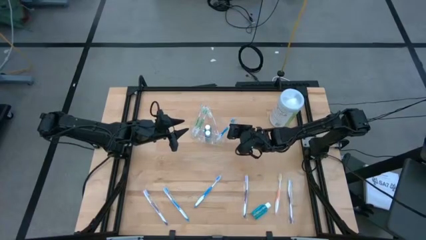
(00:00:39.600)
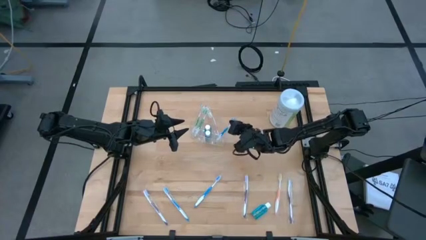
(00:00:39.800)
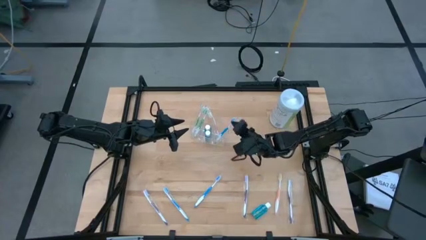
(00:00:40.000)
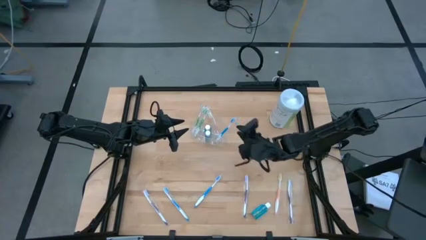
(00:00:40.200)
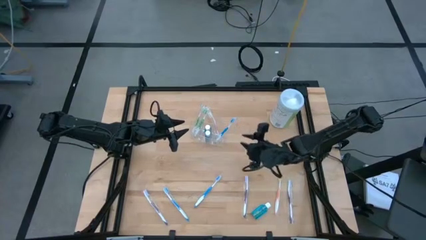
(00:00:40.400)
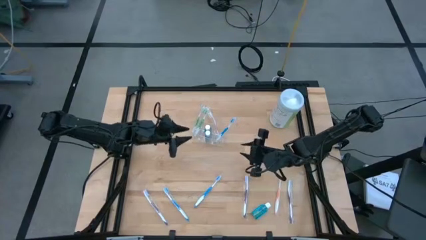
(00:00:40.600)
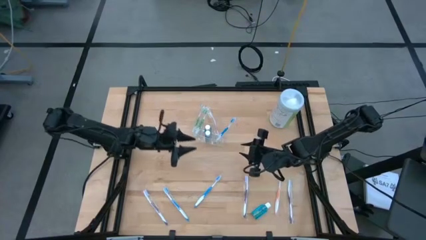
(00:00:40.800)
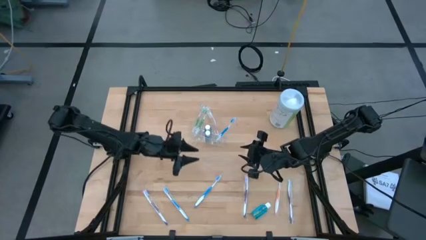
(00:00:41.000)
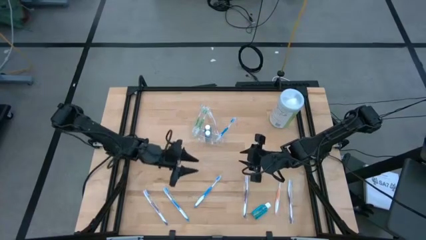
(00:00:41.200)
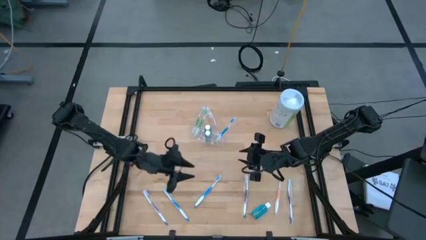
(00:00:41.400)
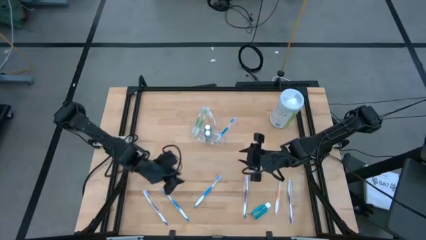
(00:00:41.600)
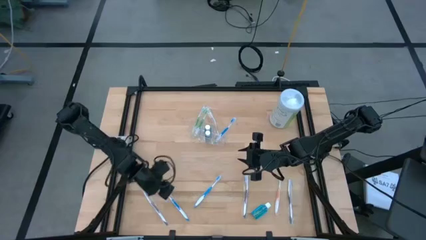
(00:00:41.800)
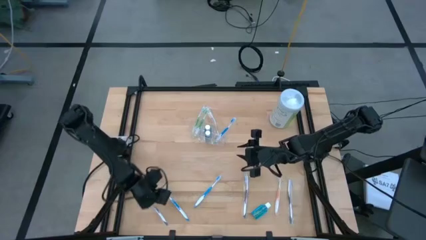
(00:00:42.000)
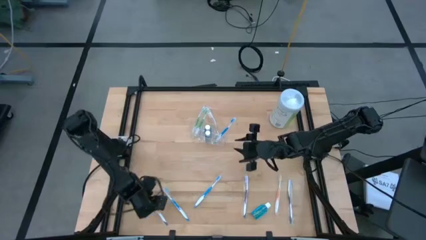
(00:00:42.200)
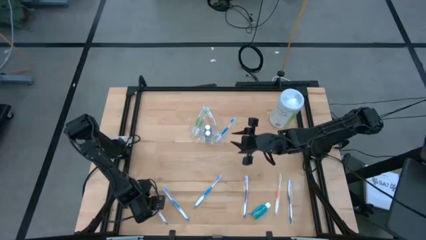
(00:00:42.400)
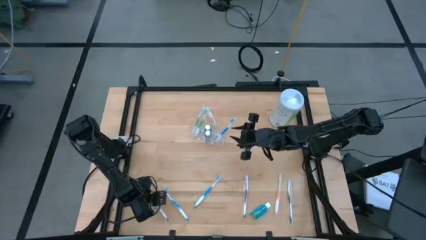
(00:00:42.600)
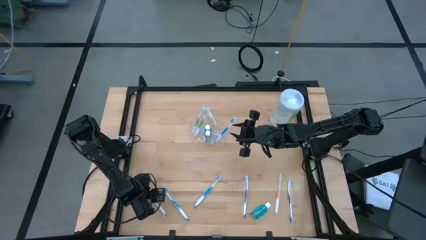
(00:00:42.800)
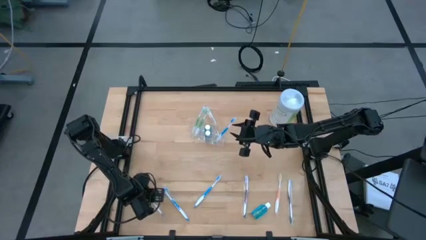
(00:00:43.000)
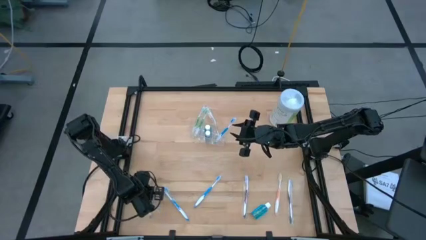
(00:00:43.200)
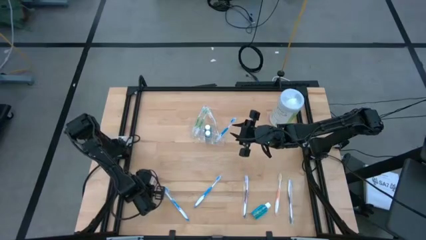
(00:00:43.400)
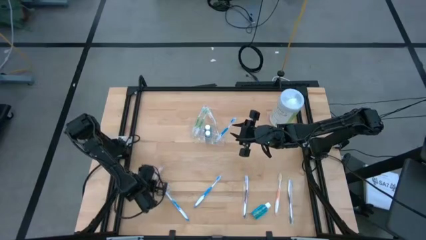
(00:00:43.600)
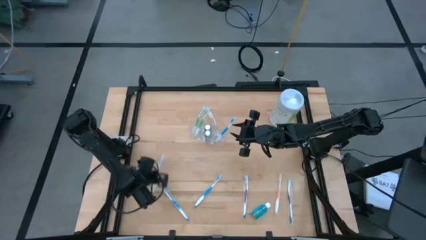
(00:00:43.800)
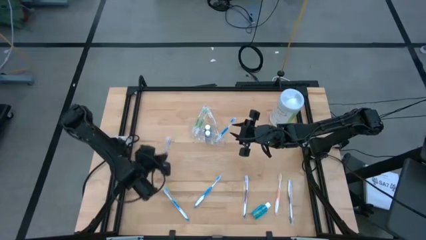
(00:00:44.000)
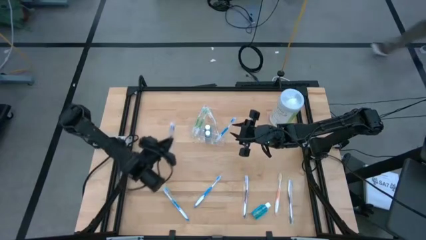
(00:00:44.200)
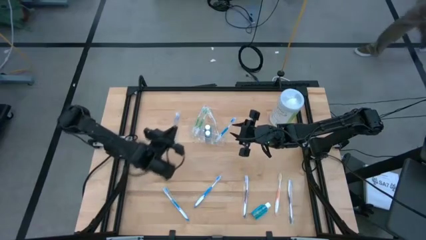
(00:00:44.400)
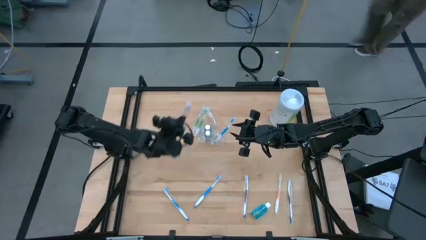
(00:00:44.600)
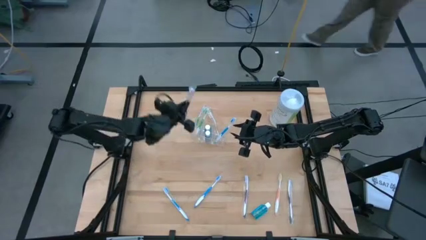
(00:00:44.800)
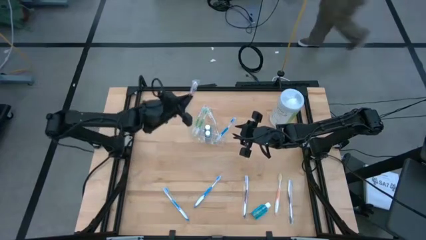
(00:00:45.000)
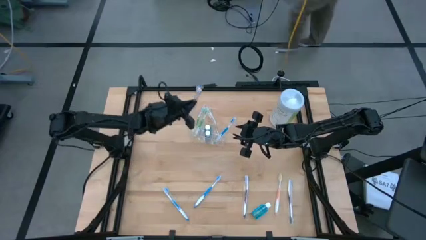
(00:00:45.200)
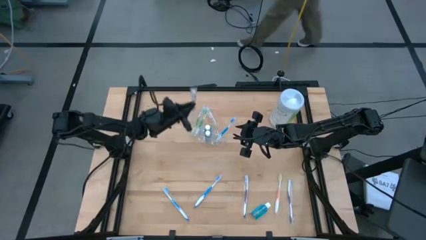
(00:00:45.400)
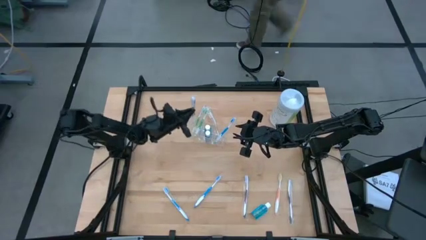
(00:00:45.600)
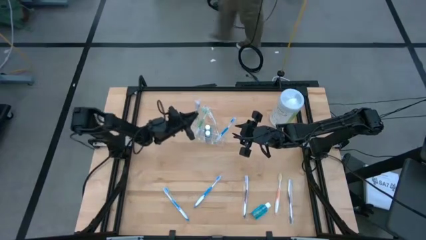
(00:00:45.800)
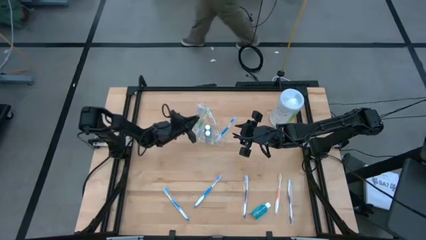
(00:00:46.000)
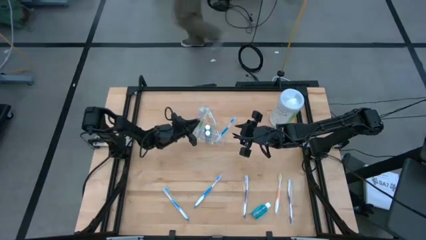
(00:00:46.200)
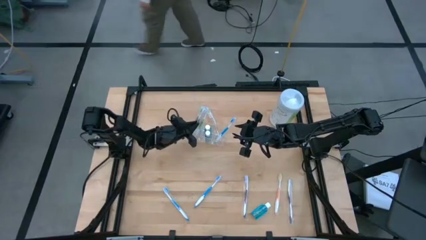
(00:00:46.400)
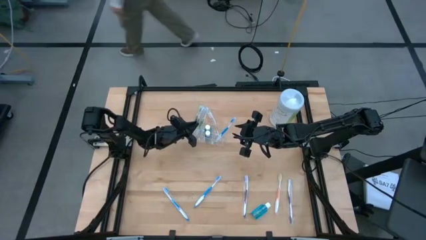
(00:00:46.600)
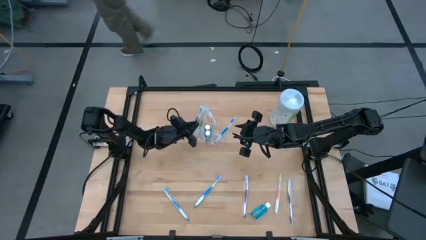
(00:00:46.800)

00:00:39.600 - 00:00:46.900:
Task: Pick & Place toothbrushing station
Put the purple toothbrush into the left section of the transparent organizer

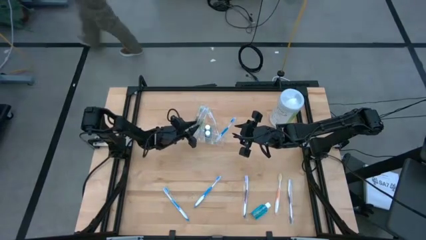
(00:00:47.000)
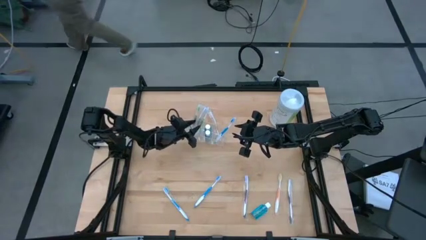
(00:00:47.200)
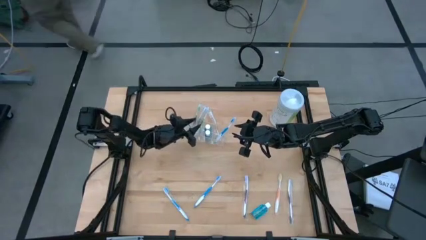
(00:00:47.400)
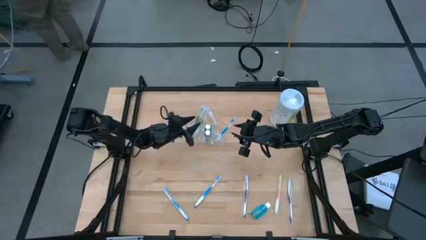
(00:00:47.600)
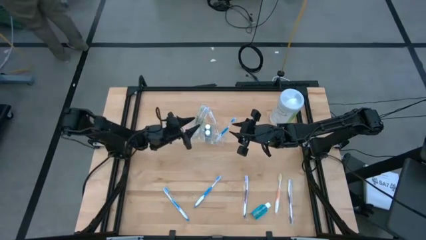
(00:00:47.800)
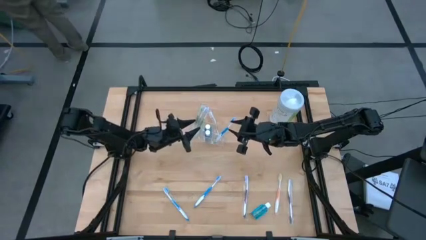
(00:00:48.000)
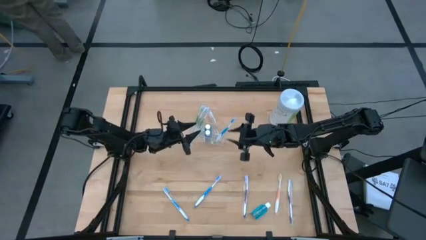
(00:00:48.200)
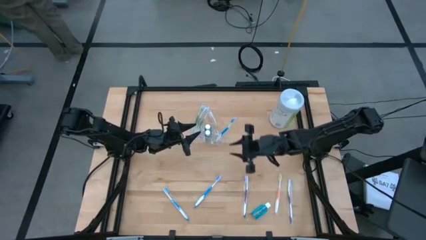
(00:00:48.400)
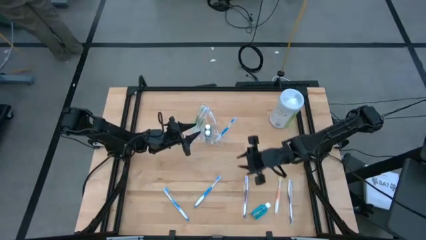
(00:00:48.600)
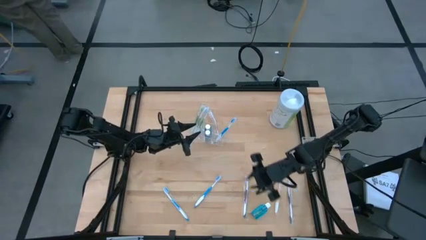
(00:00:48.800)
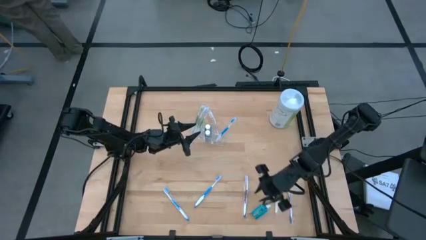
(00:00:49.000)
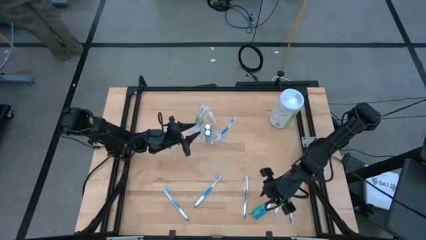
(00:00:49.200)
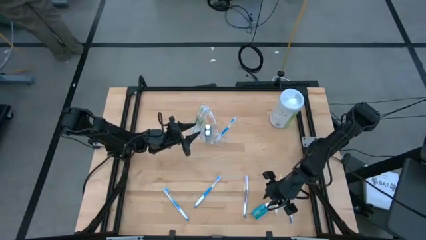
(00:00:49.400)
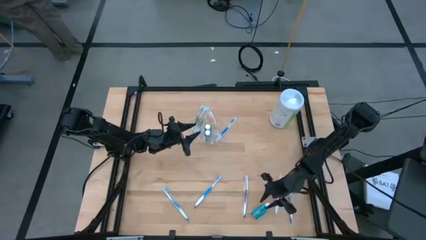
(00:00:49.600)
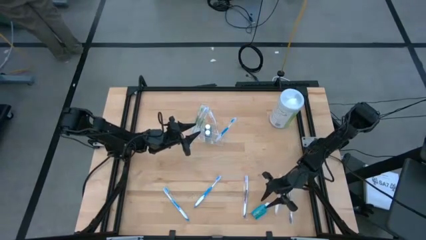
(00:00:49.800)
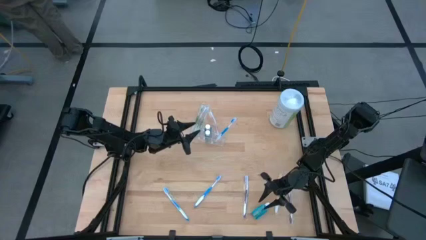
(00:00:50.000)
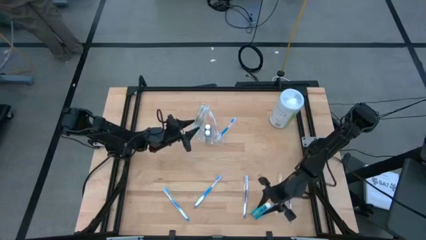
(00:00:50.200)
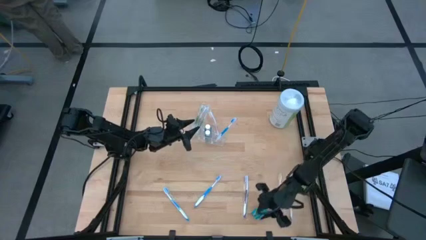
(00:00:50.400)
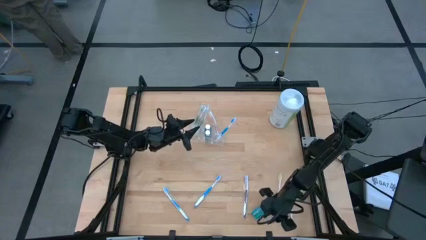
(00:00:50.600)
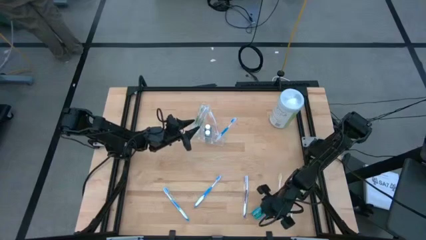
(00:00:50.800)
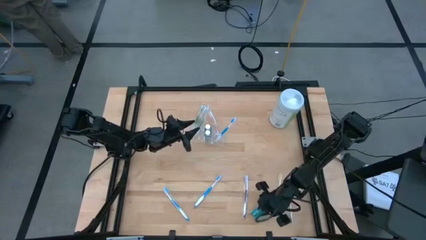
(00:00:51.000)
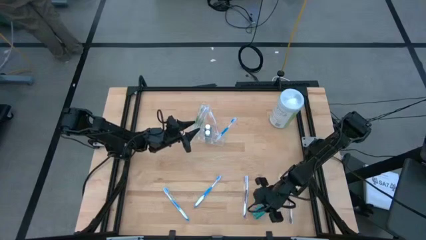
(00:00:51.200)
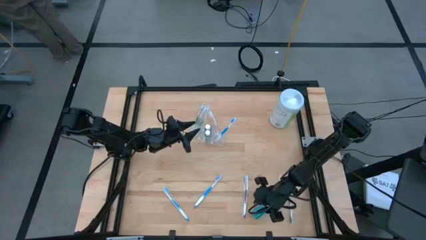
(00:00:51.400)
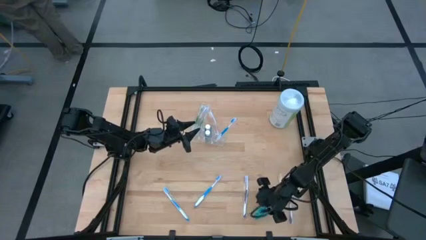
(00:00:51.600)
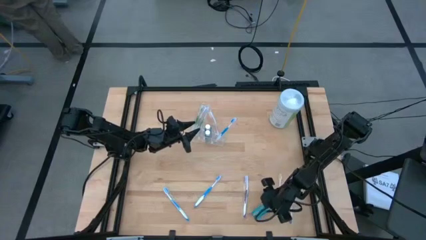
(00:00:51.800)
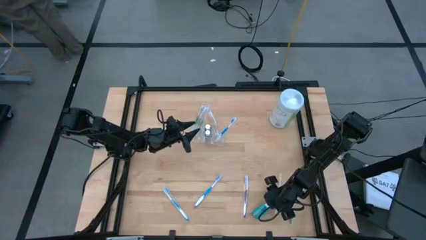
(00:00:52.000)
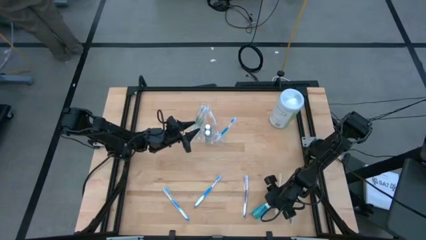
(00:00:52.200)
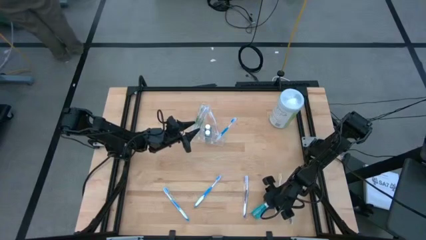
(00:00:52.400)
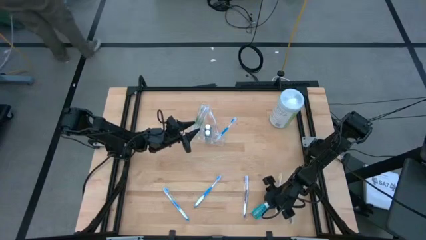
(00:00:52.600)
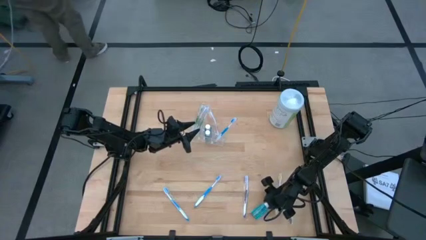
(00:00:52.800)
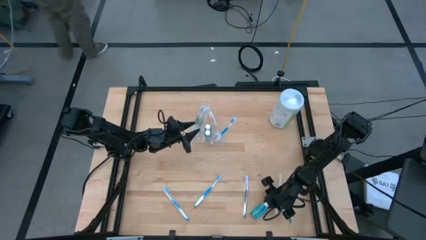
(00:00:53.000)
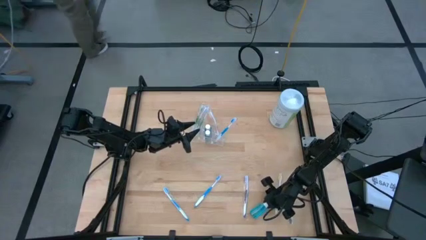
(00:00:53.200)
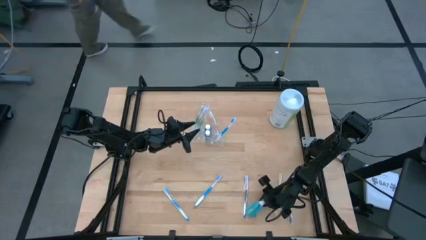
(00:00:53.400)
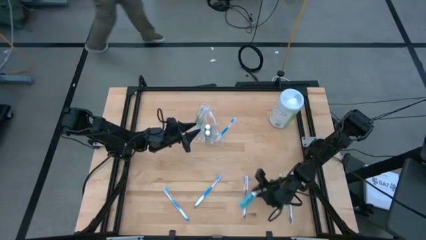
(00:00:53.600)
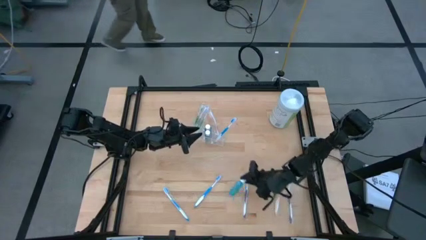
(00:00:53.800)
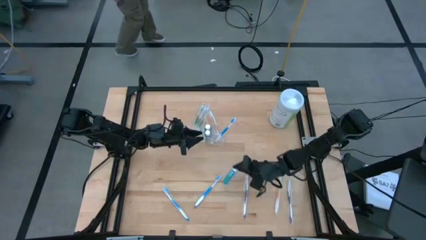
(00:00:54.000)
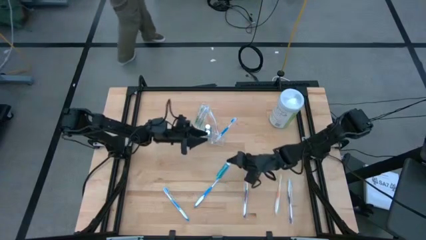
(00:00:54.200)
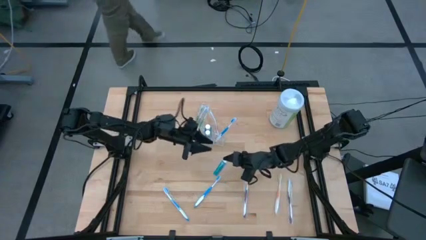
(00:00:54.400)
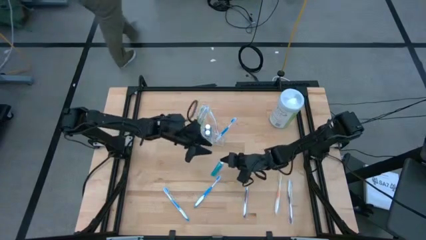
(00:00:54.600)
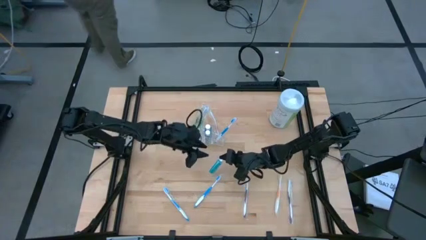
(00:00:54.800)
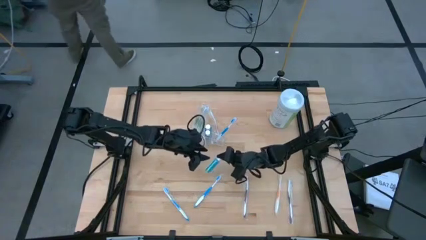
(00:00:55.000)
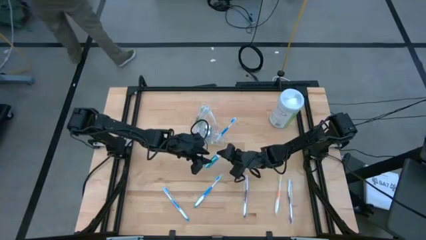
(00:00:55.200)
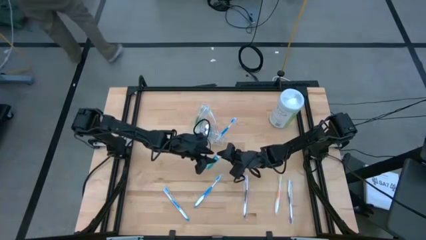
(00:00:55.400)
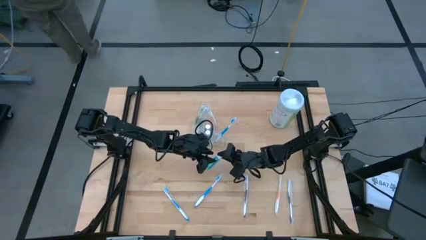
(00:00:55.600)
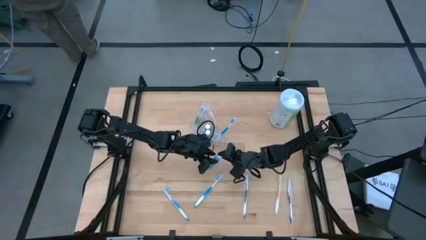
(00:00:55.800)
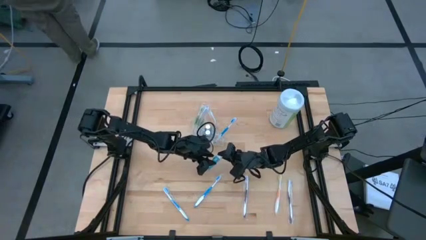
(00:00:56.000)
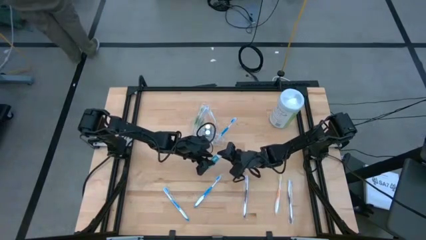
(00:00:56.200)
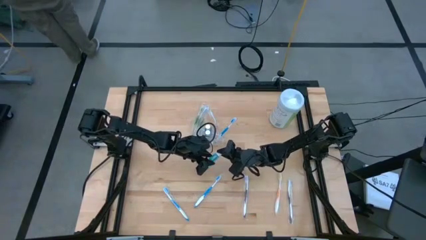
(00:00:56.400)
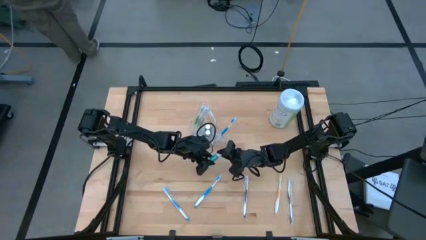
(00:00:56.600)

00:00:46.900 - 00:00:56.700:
Put the blue mouthwash into the middle section of the transparent organizer
